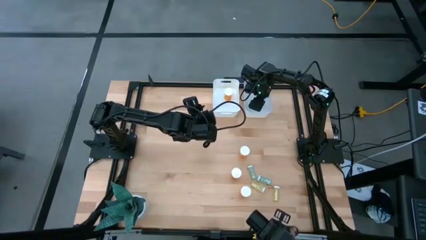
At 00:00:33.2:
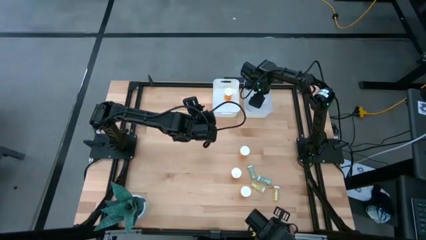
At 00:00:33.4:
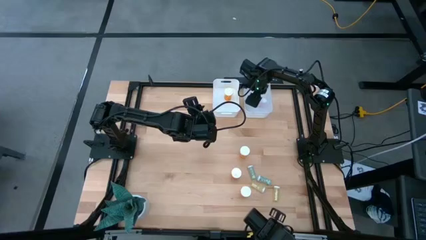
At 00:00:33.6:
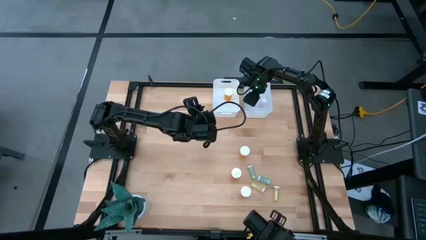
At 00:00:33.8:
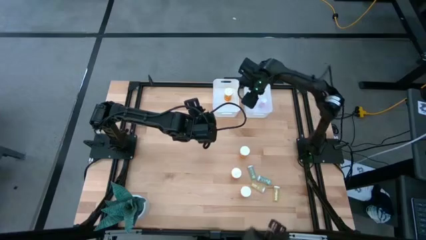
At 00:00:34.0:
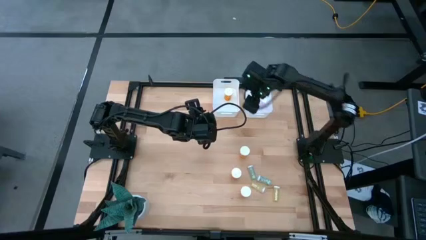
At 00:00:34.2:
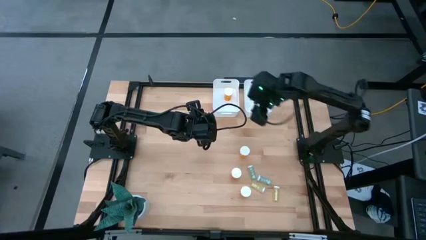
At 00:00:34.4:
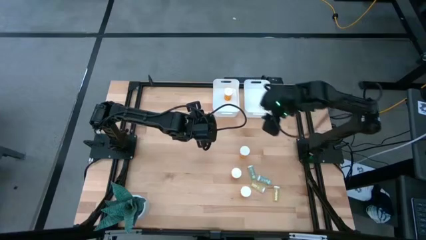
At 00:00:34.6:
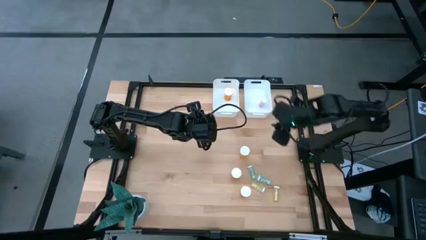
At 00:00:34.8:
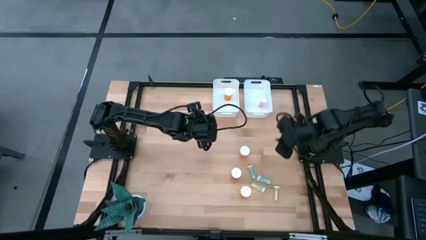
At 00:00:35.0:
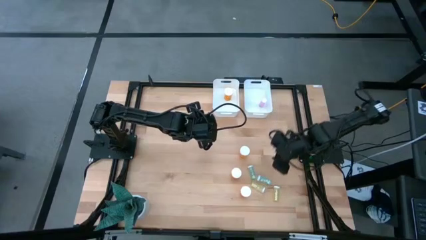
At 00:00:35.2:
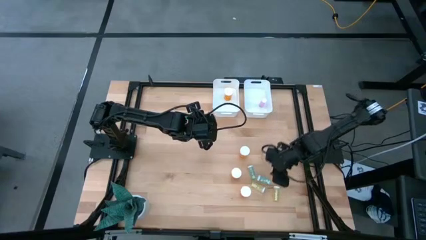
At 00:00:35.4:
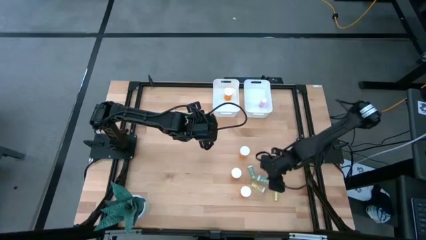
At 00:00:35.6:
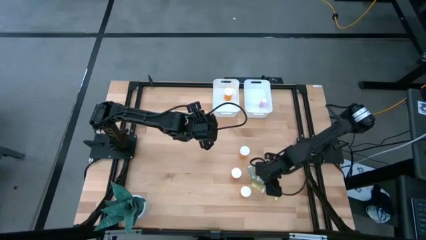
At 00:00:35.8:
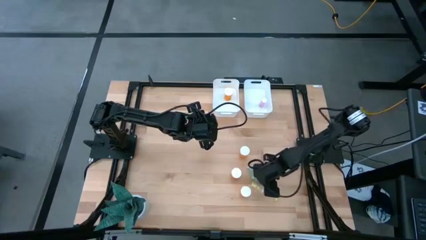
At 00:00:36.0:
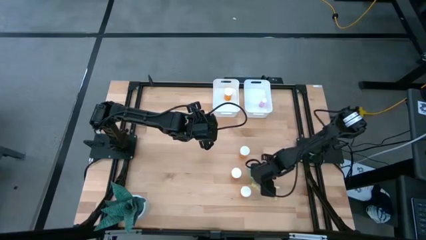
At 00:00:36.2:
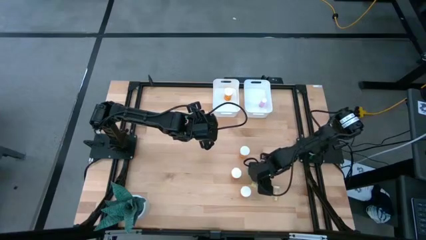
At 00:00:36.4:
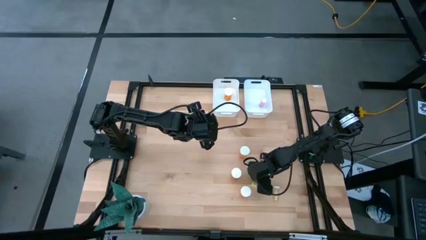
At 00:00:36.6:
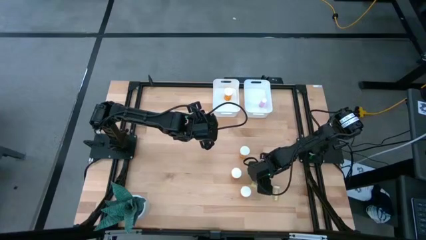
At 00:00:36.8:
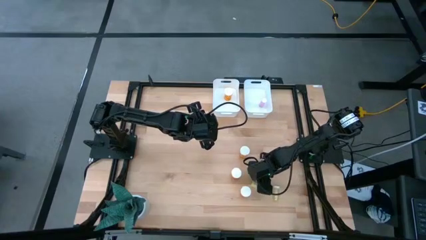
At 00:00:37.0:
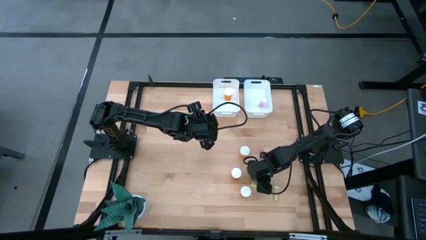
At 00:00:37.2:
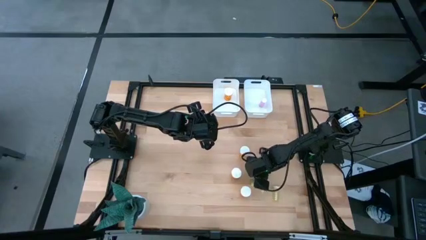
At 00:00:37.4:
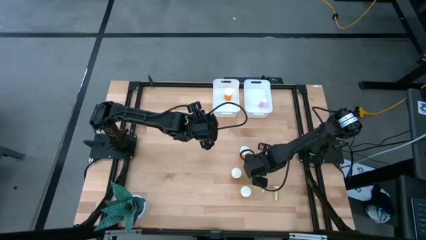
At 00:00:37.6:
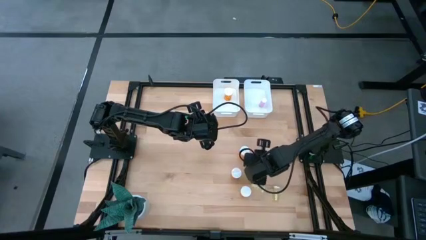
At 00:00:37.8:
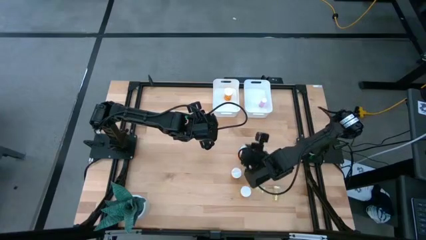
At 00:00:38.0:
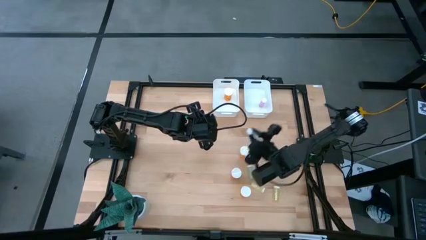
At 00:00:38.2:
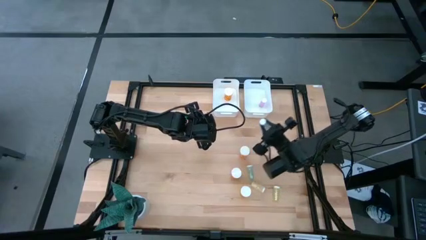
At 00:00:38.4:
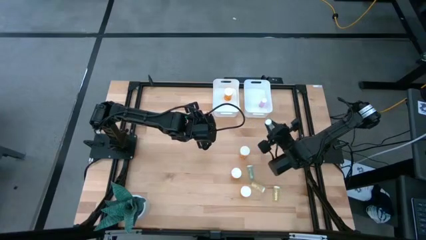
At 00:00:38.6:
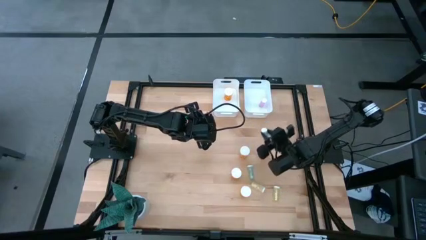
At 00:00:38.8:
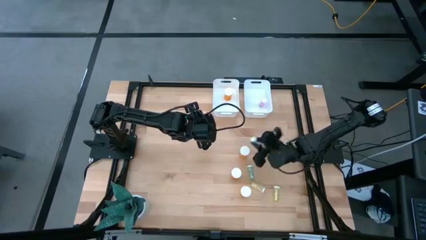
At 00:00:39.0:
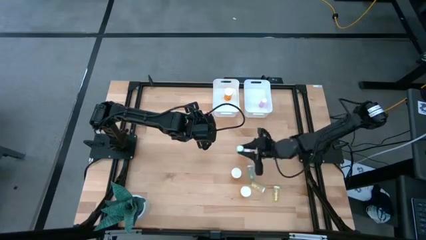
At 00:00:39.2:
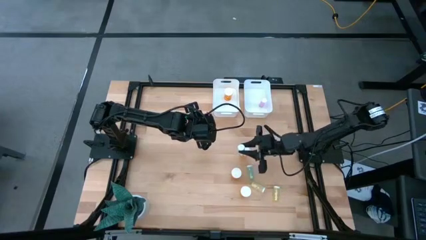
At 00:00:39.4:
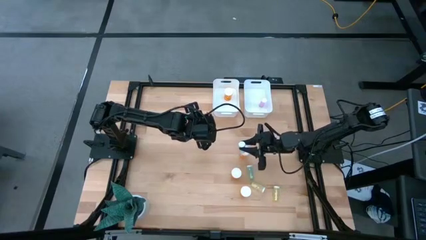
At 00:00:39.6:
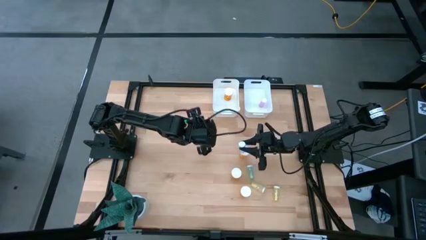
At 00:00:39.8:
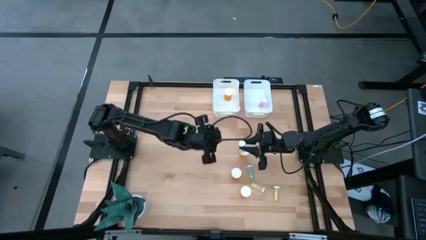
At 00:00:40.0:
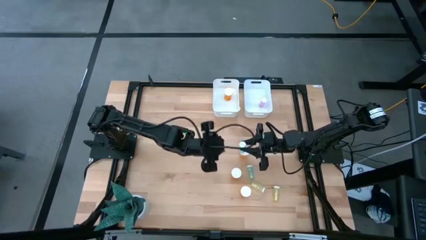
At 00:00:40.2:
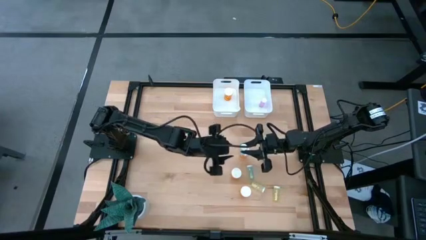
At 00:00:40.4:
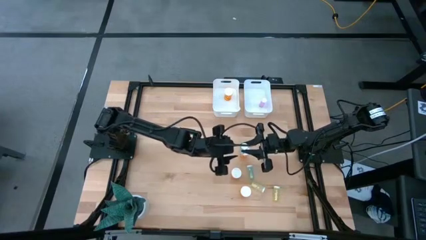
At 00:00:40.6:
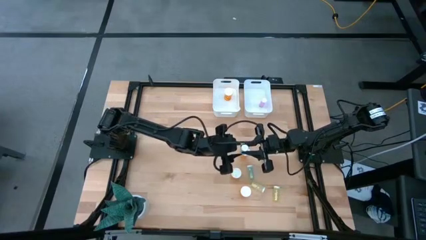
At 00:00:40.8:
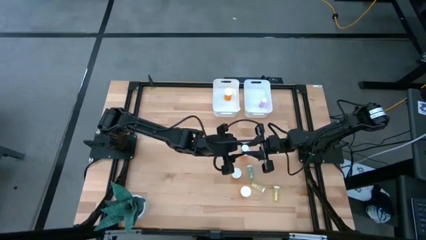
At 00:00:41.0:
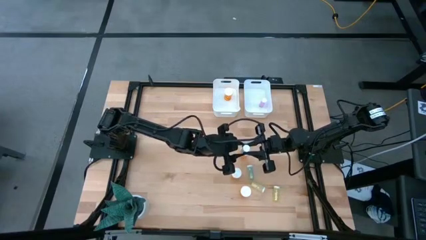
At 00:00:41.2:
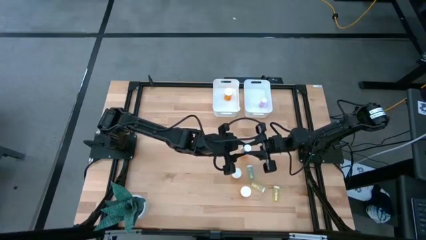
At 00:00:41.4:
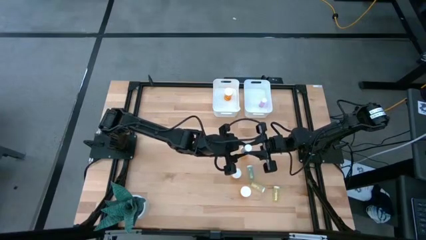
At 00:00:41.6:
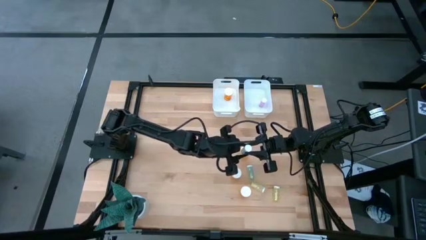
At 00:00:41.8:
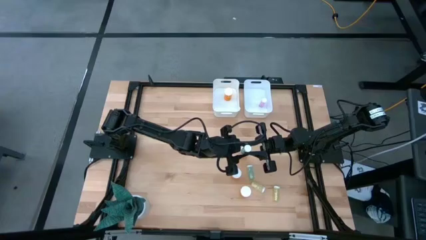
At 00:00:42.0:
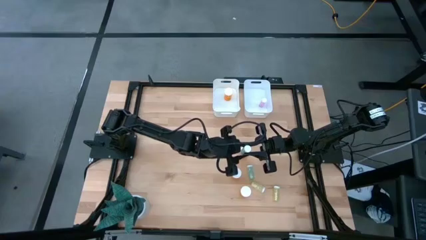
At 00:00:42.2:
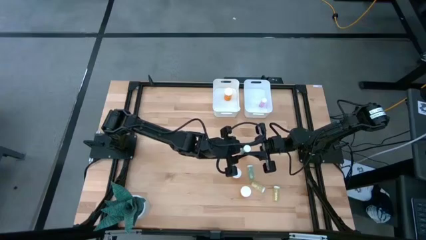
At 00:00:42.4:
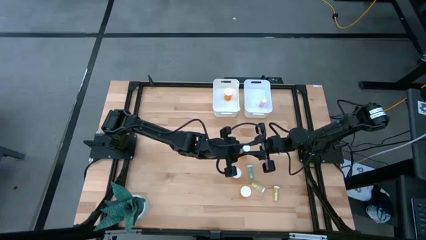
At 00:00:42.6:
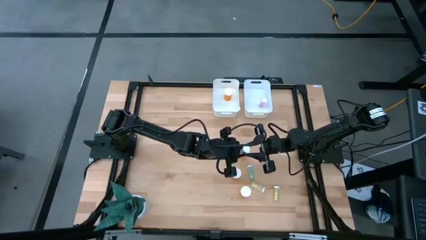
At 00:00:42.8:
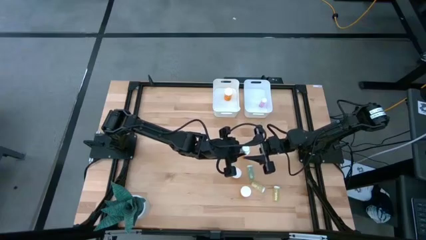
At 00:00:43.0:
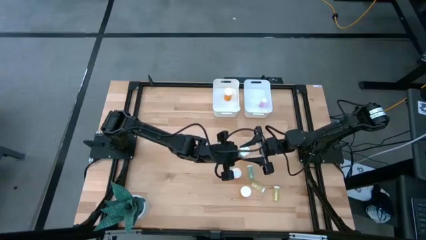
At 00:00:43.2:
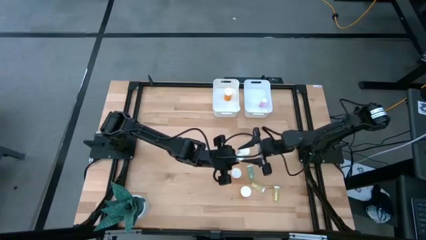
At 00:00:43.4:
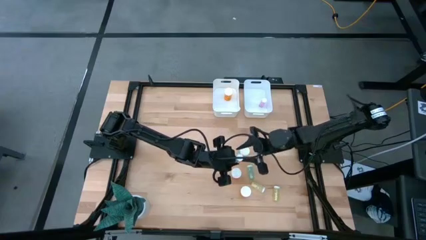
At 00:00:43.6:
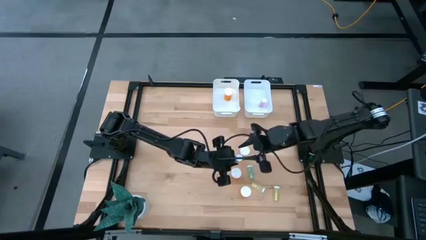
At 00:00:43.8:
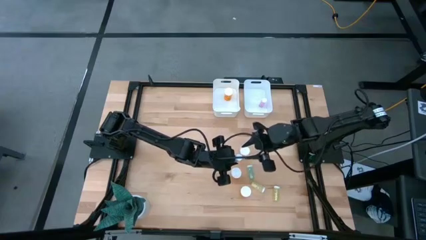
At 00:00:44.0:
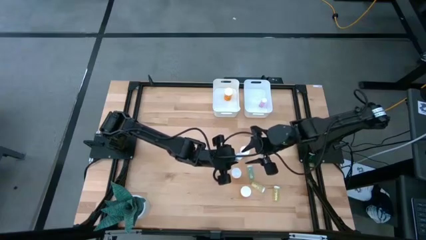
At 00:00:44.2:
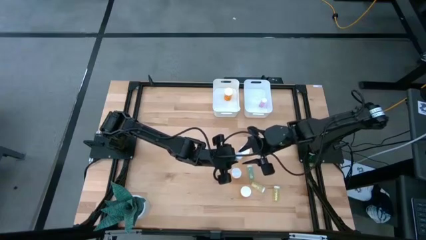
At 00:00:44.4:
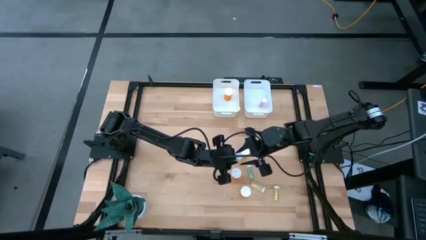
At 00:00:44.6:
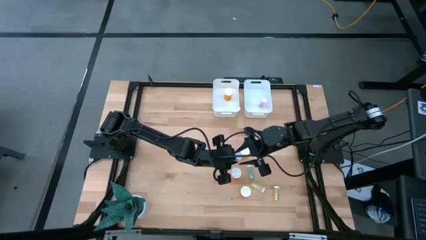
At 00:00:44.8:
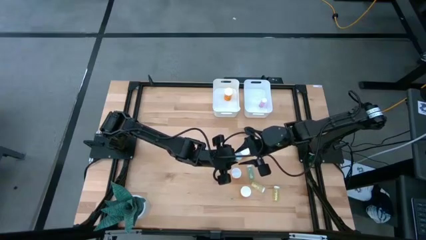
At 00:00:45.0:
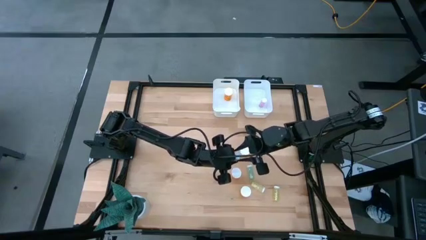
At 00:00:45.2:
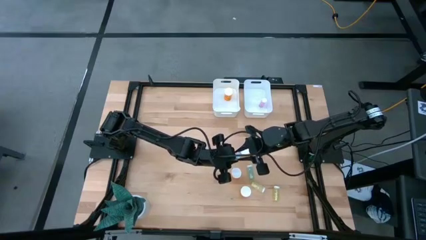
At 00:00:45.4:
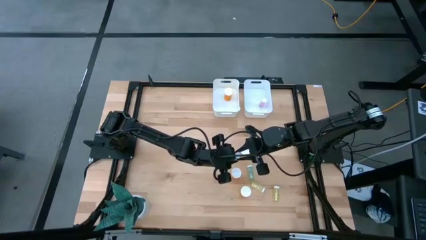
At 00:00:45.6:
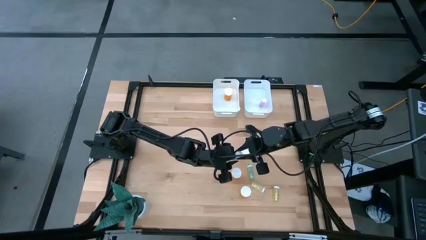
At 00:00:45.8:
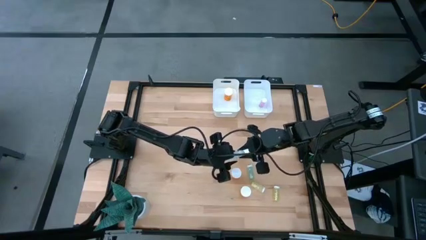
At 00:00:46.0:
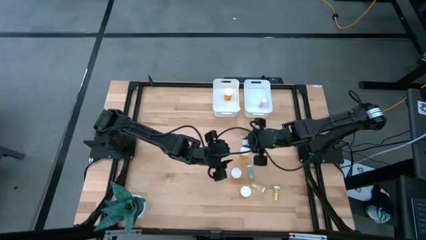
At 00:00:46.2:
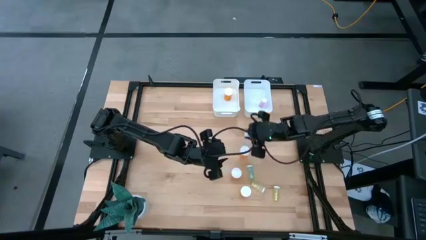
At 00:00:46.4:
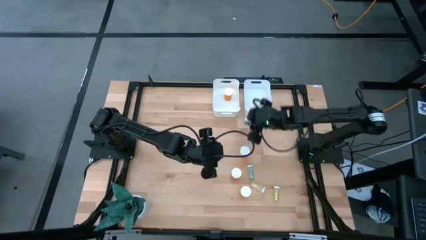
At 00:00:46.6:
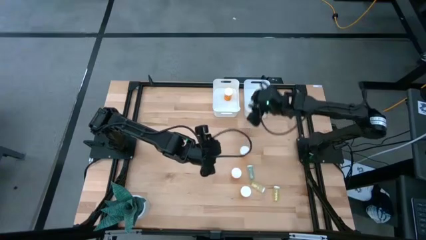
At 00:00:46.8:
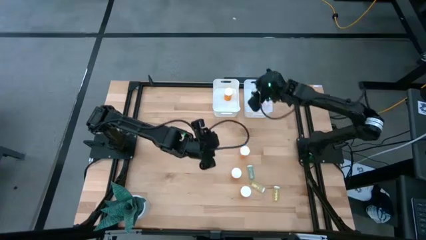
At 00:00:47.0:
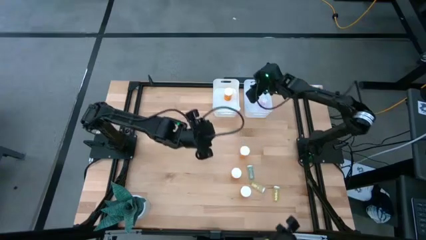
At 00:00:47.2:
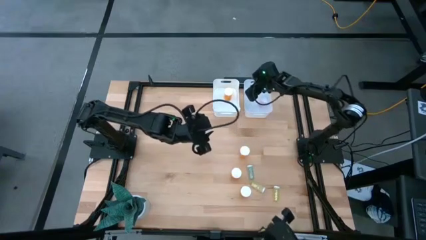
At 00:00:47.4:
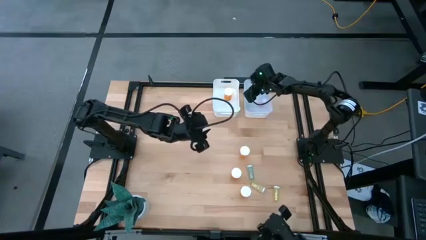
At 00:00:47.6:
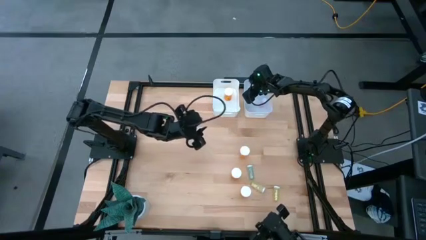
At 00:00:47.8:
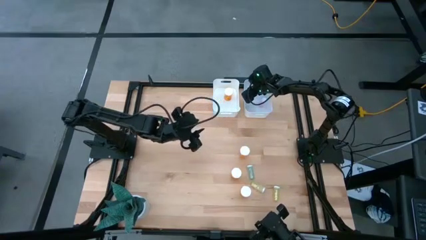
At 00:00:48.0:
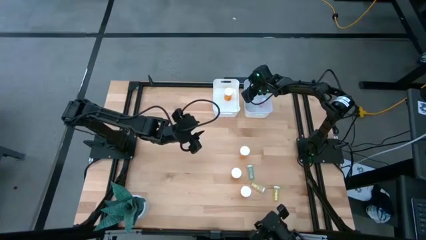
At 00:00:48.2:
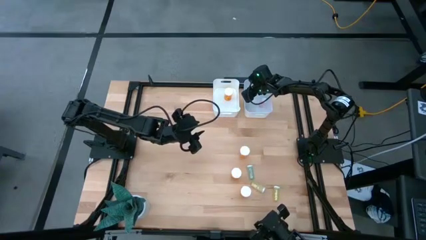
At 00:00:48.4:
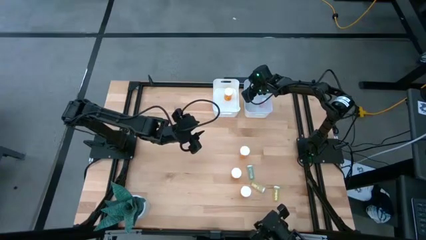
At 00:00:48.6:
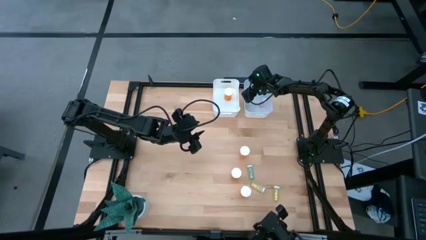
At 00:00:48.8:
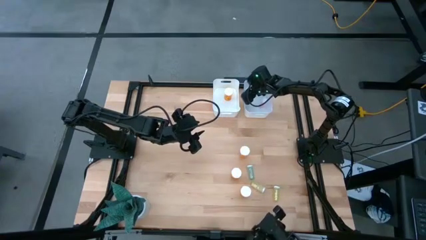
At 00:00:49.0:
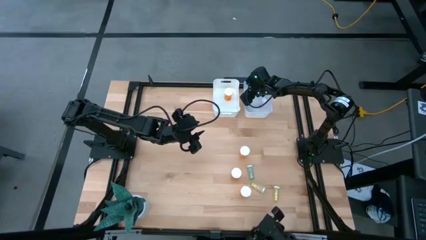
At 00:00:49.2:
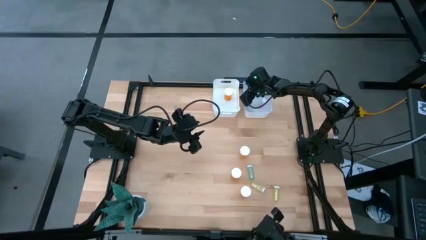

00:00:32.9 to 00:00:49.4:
Task: Pick and place medicine bottles into bin by pill shape (circle, oval)
Put the small blue medicine pill bottle into the right white bin
